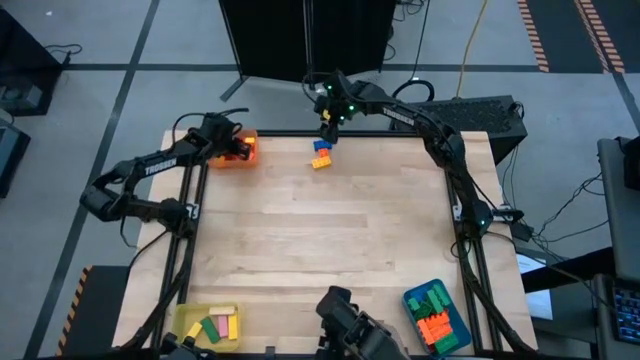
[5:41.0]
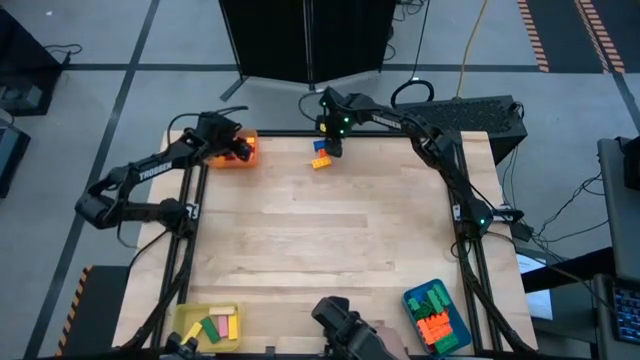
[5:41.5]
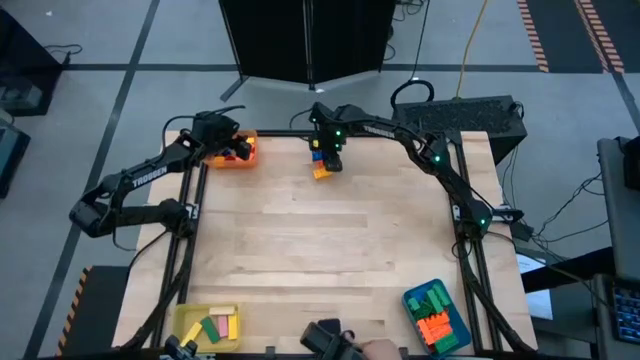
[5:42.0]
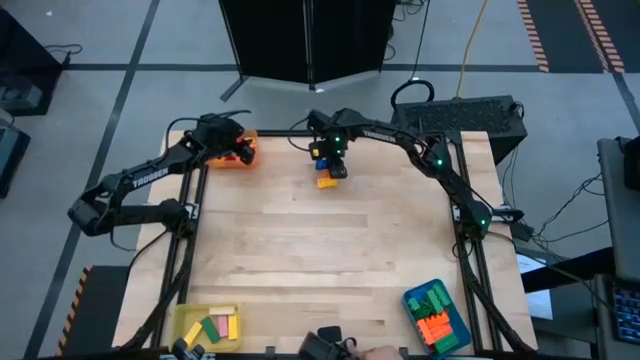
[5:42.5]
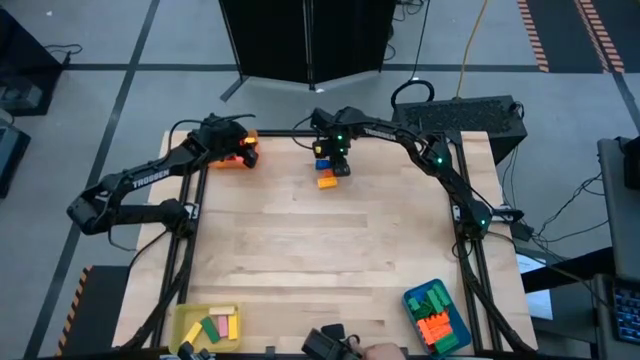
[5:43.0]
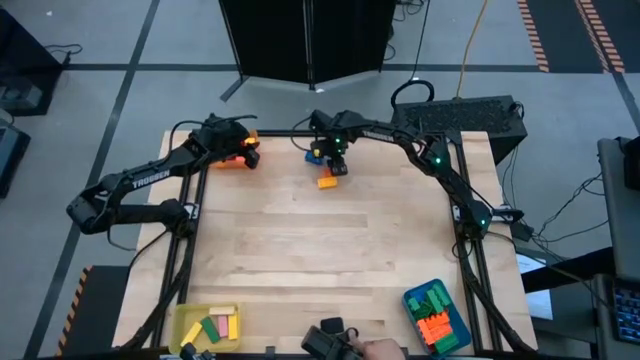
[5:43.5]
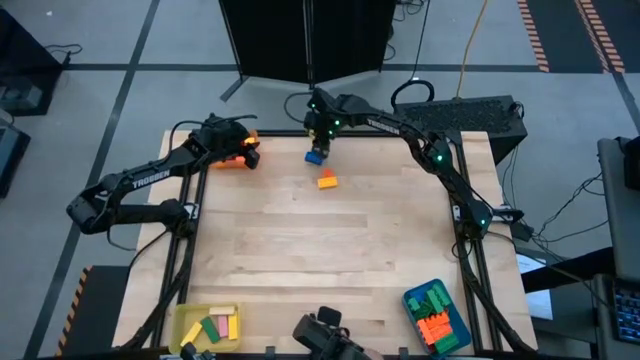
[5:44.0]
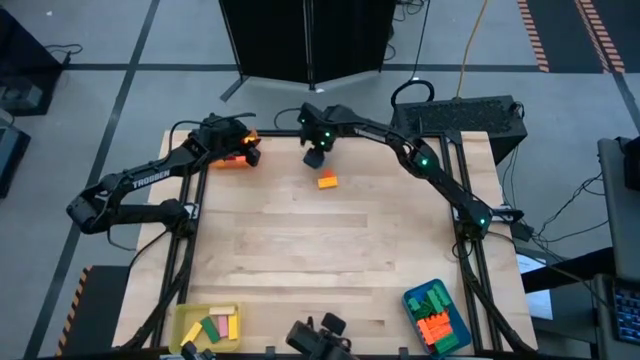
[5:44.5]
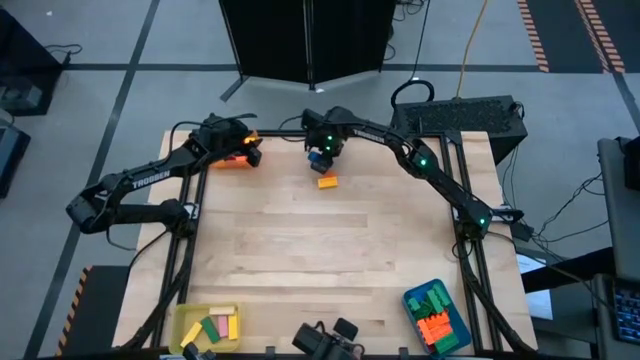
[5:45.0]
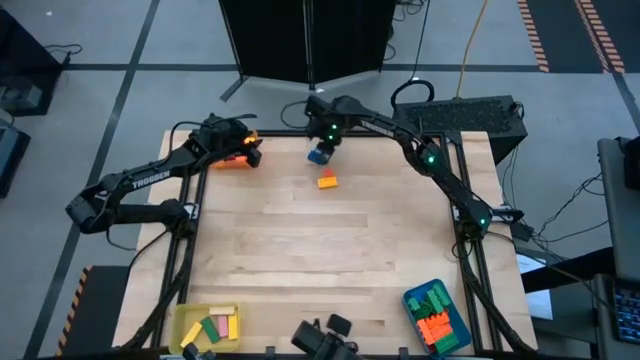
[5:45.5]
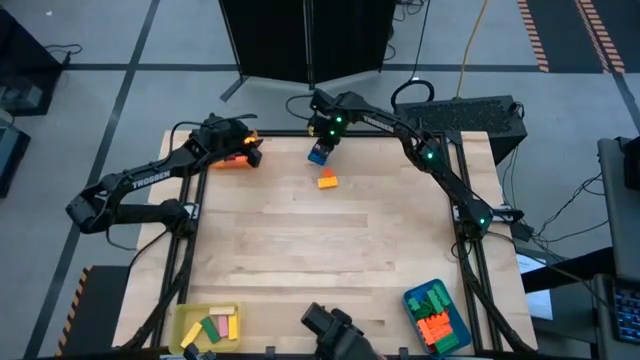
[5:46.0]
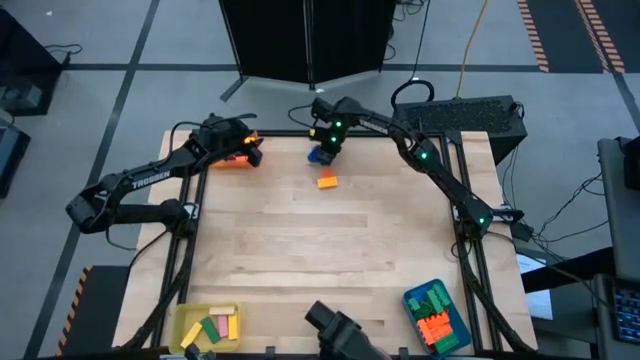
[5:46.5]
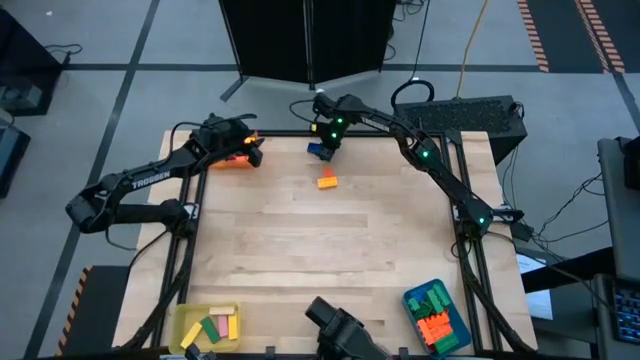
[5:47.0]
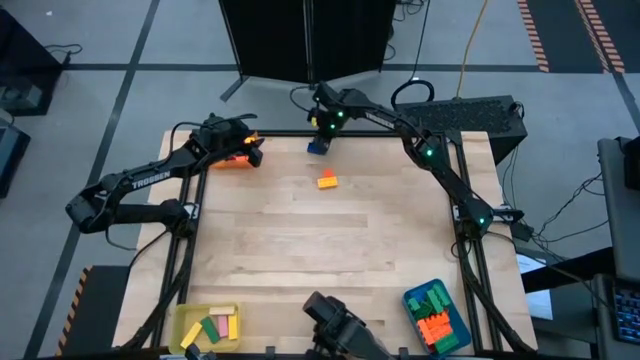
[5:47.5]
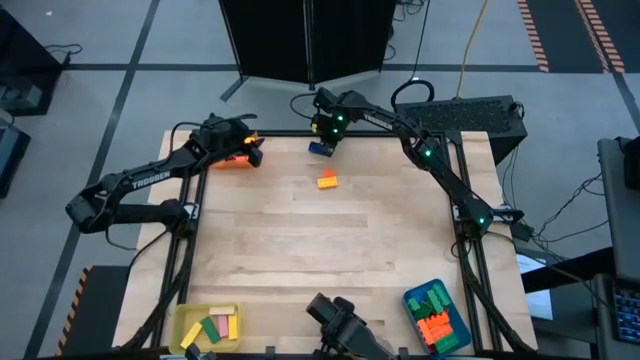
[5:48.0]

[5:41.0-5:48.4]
Task: Sort blocks by size
Put the blue 8 stud game piece into the orange bin

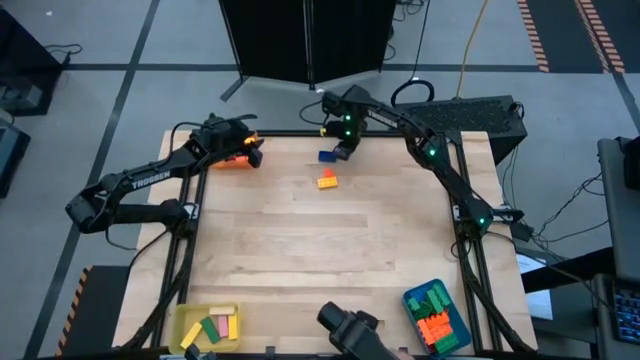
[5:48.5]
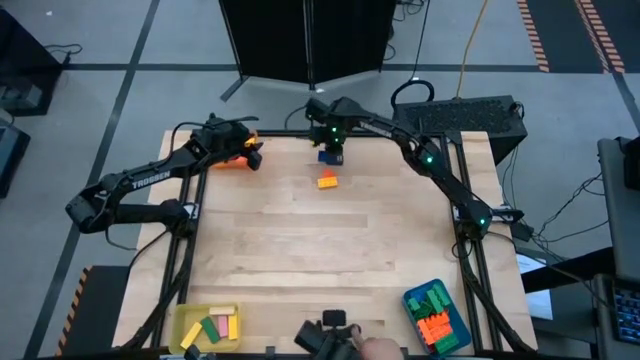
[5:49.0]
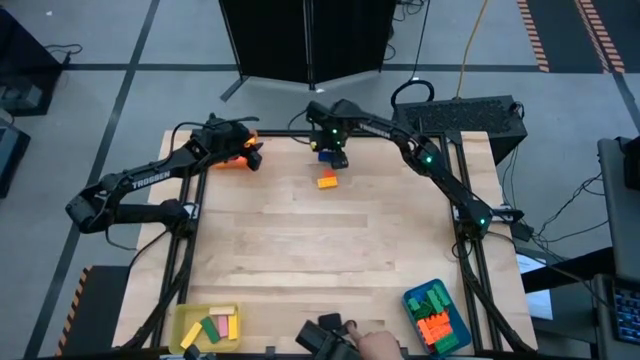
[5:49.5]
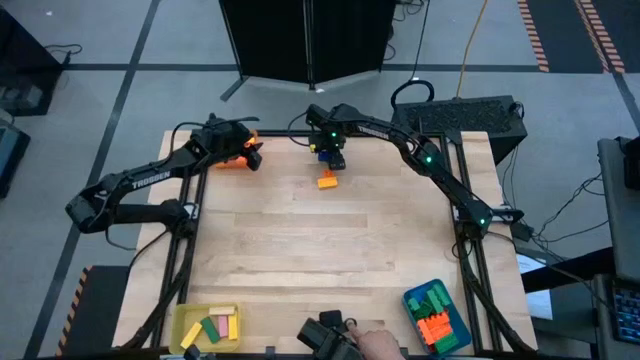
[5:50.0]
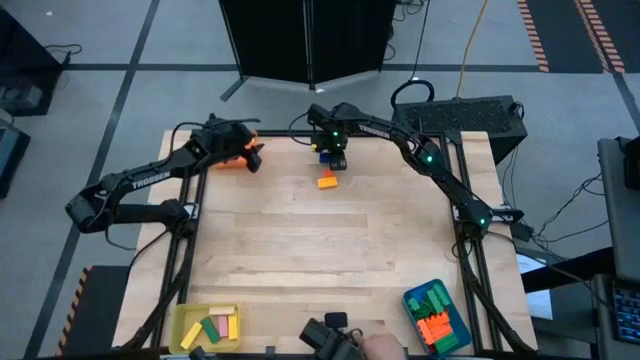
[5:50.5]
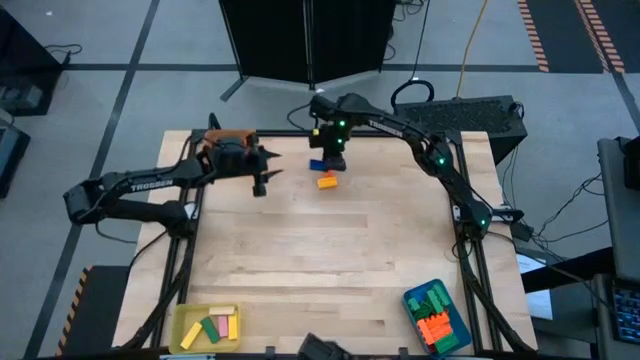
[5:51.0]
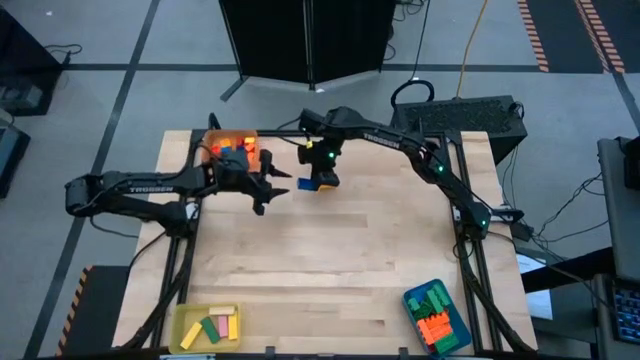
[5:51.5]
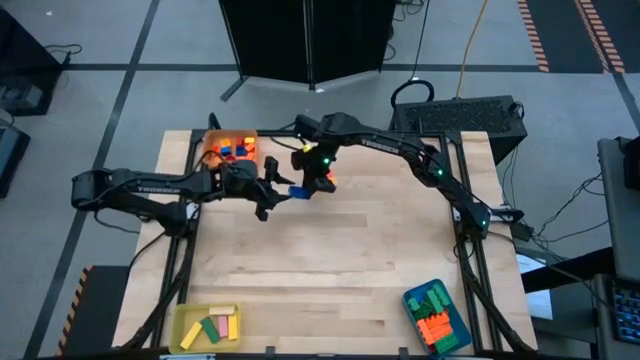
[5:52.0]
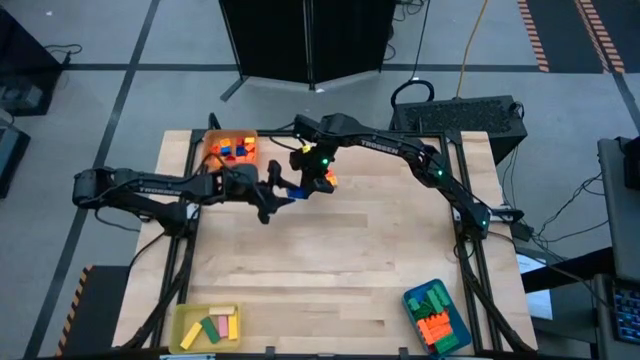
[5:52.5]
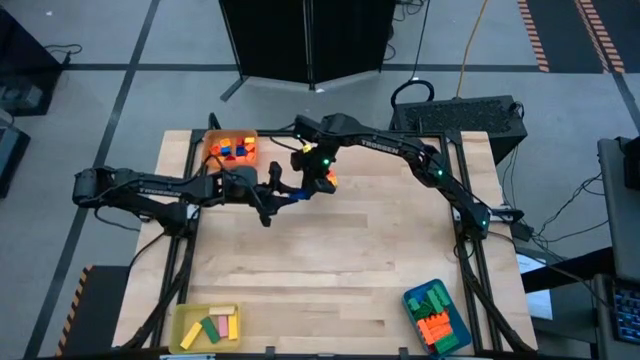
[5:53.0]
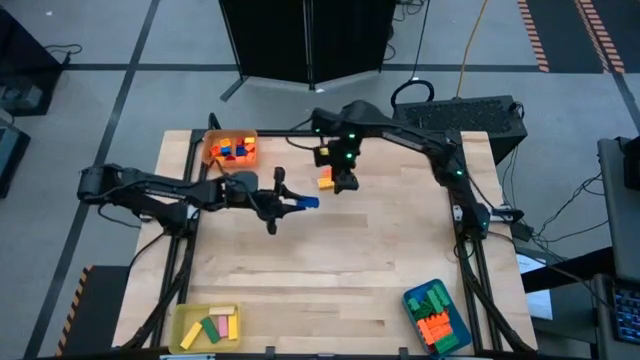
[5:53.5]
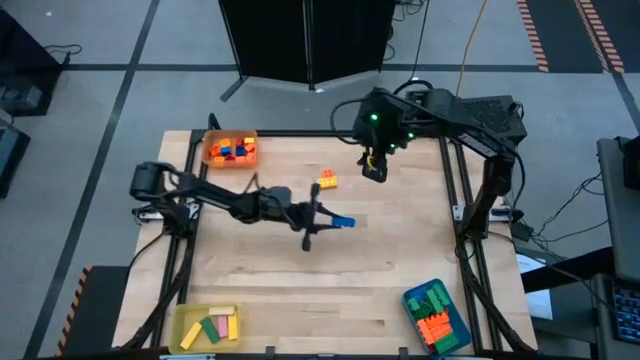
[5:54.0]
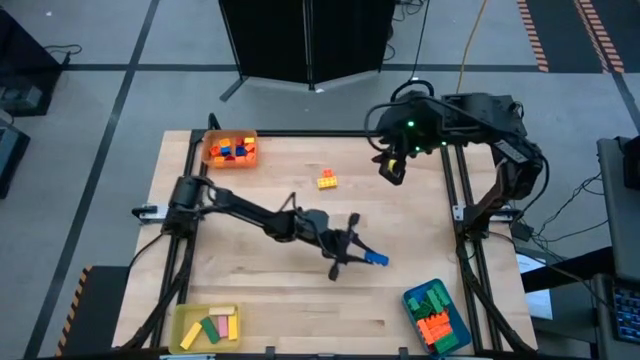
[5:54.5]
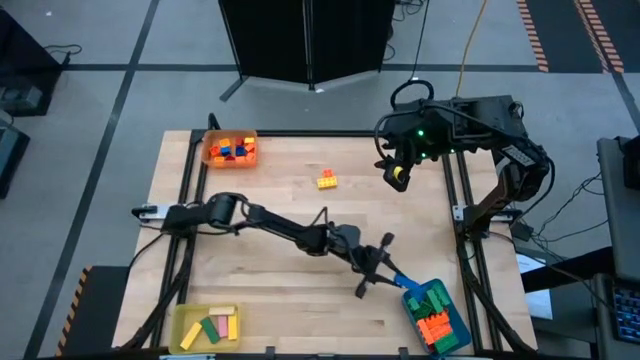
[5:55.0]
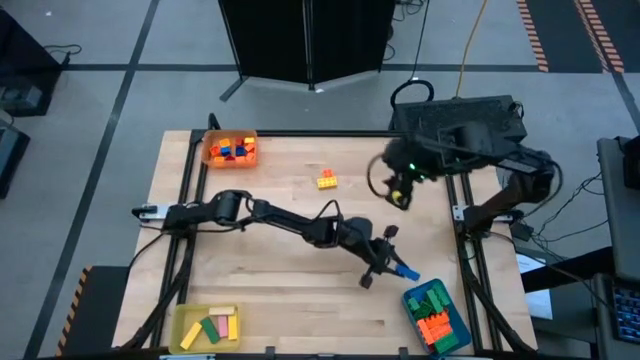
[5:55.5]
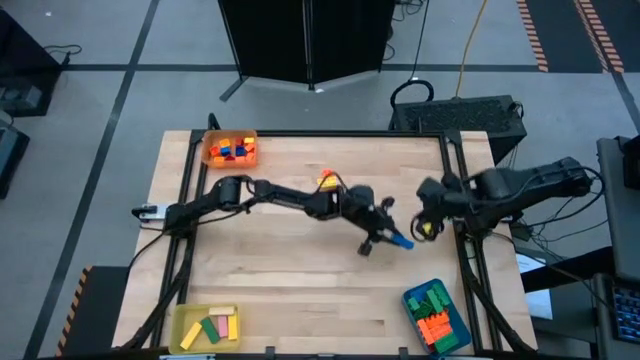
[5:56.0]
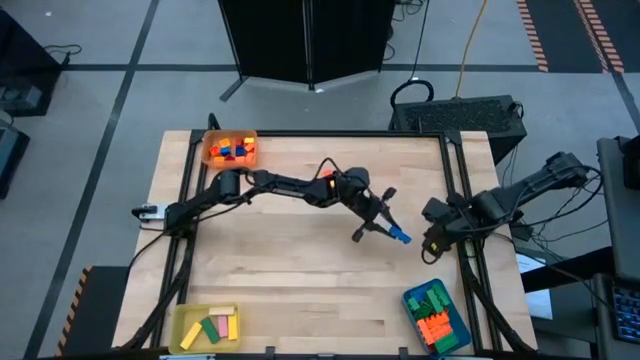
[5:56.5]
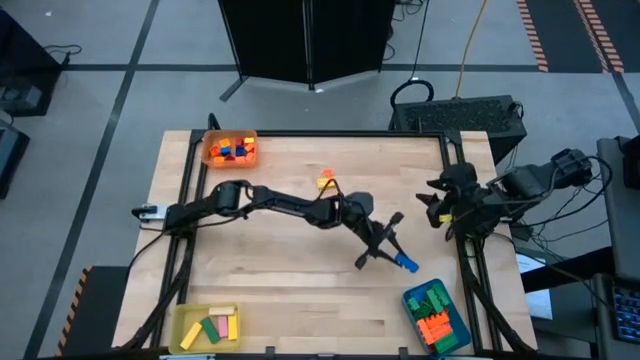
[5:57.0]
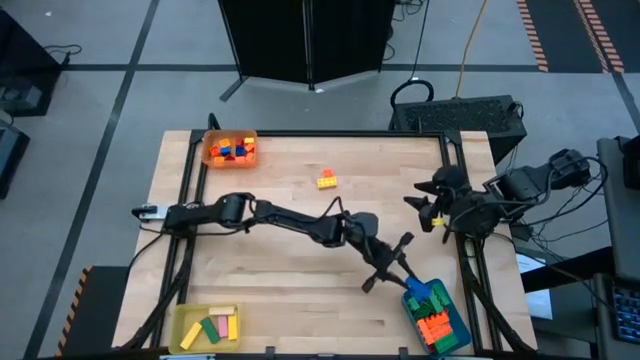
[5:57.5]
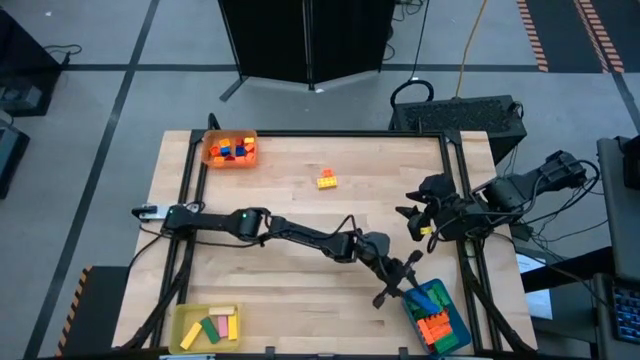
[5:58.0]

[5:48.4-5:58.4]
Put the blue 8 stud game piece into the blue bin

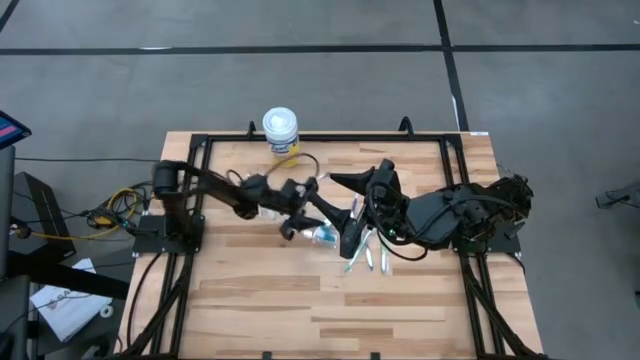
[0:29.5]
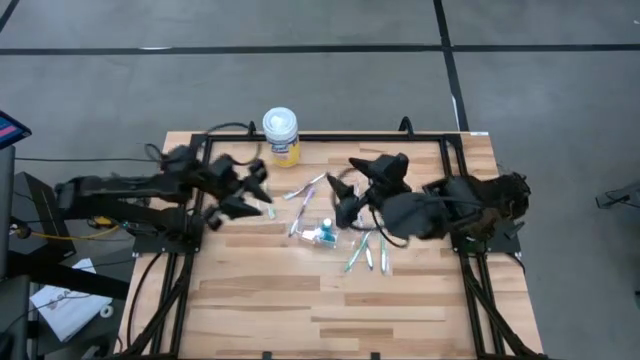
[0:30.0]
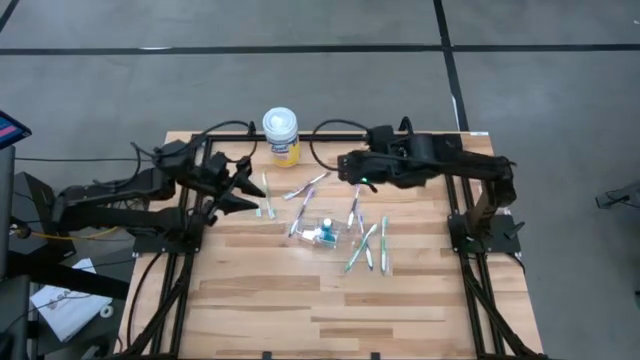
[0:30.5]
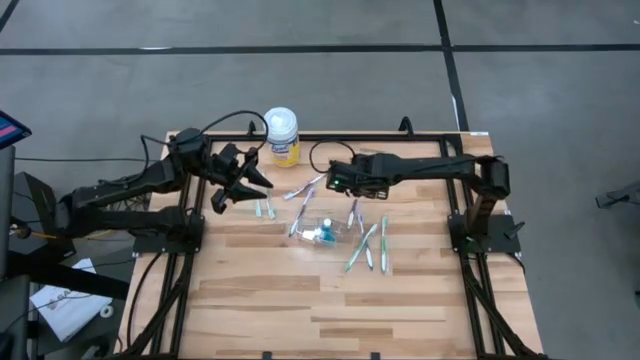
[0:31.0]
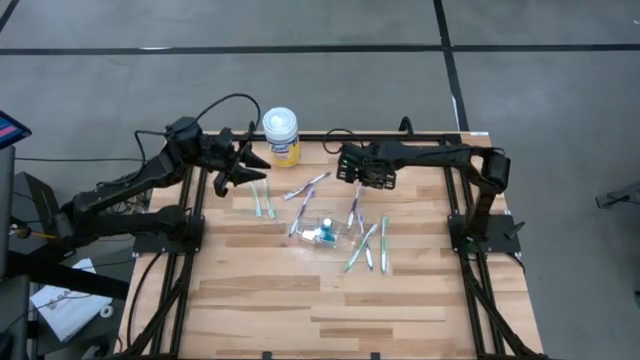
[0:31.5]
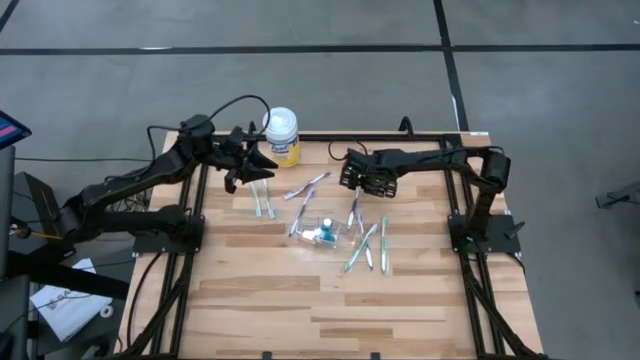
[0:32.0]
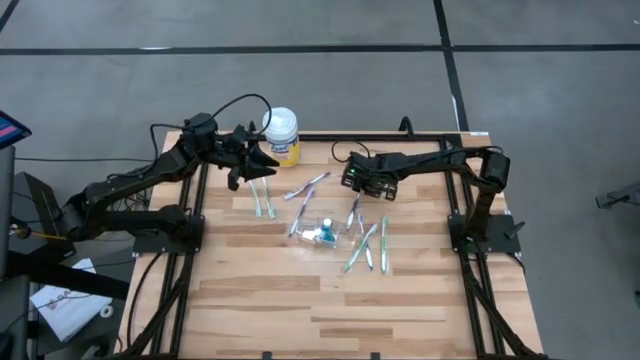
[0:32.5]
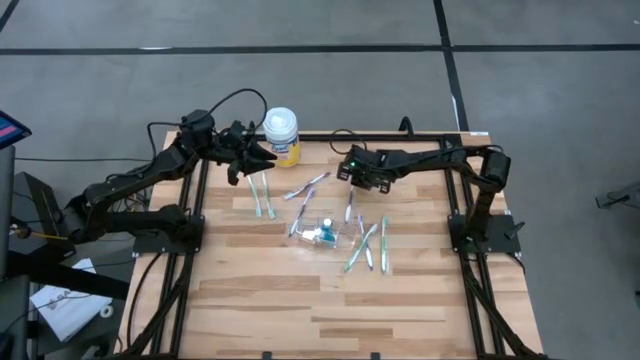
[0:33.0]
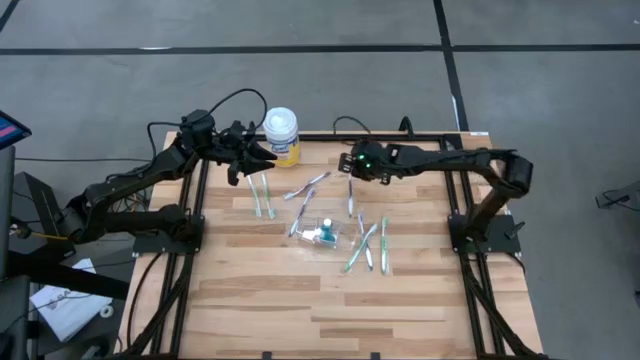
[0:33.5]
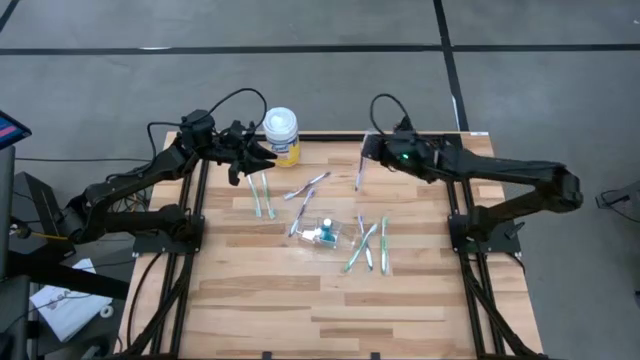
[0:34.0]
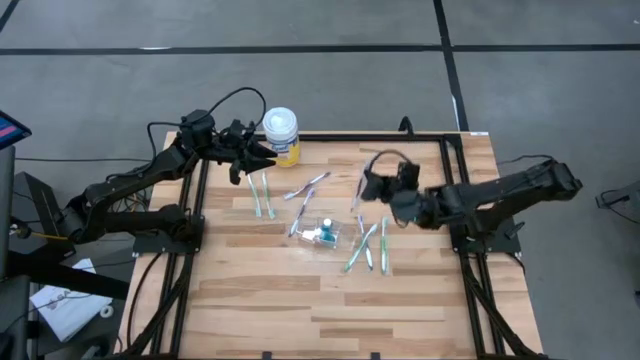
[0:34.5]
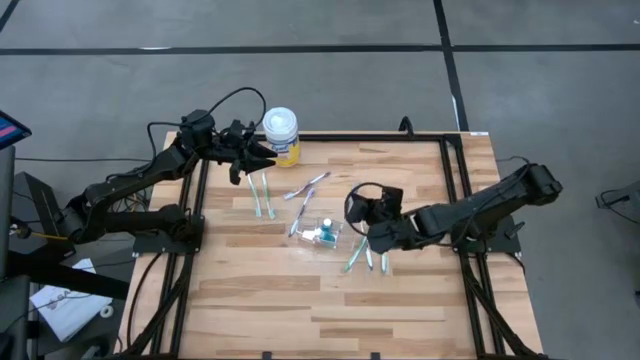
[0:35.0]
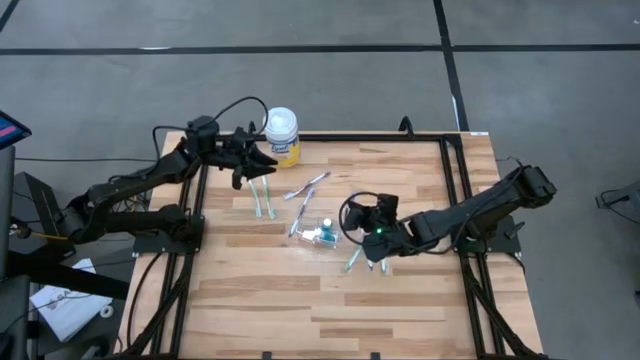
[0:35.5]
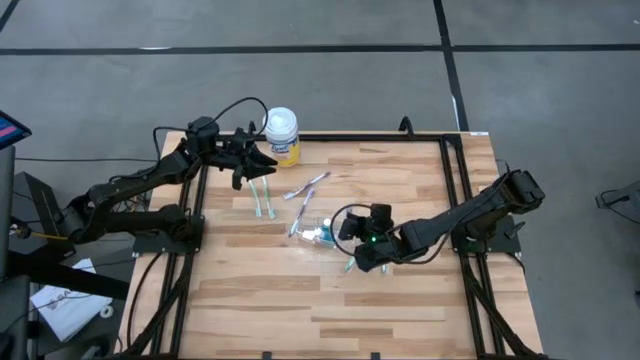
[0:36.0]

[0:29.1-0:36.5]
Task: Pick & Place toothbrushing station
Put the purple toothbrush into the right compartment of the transparent organizer
